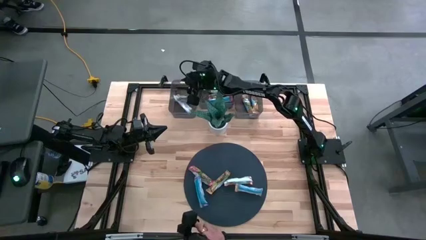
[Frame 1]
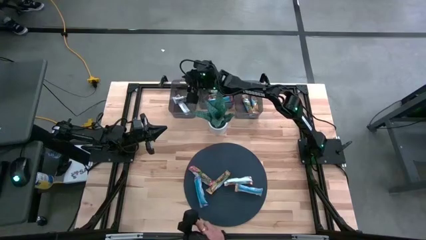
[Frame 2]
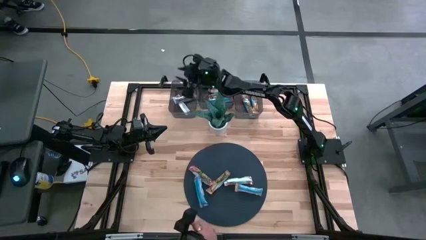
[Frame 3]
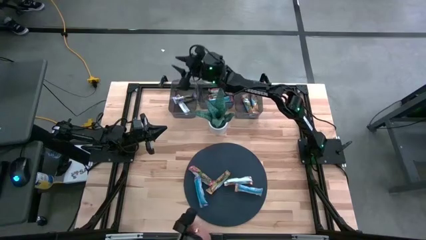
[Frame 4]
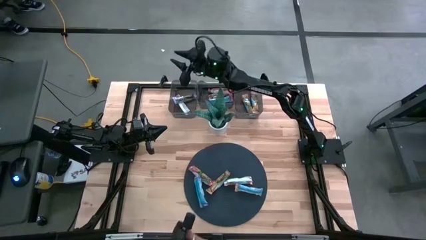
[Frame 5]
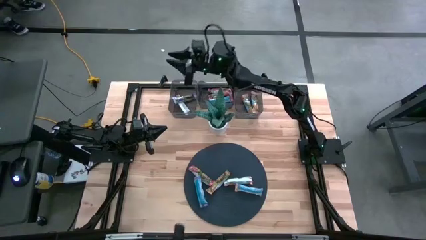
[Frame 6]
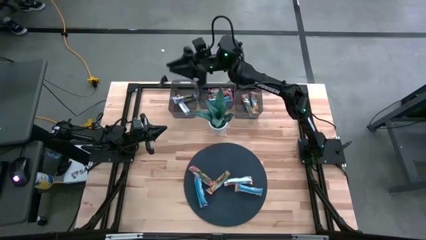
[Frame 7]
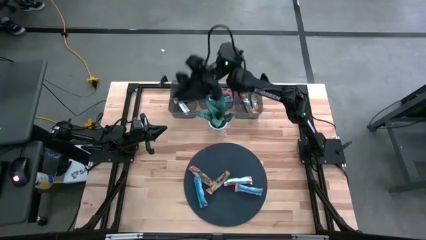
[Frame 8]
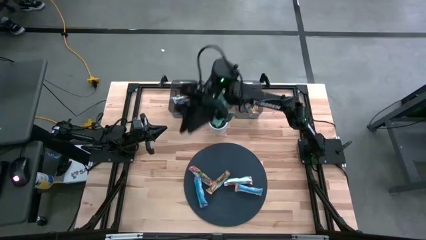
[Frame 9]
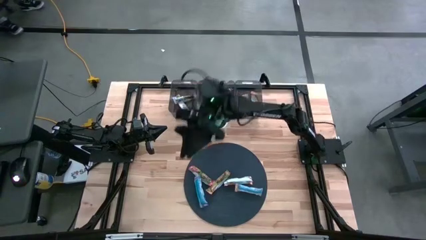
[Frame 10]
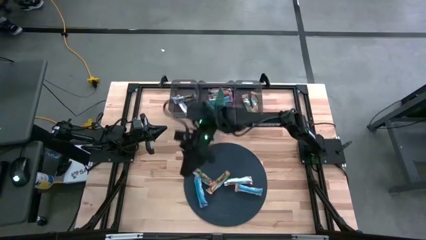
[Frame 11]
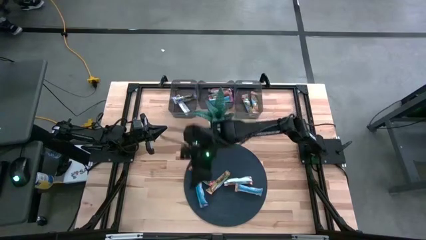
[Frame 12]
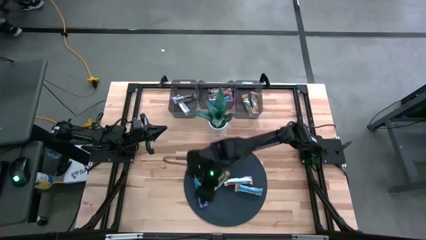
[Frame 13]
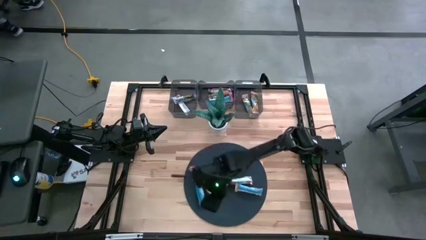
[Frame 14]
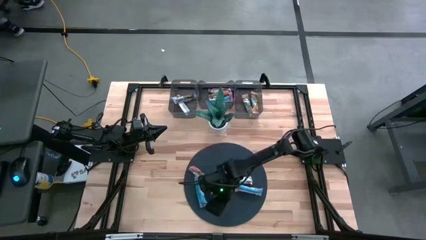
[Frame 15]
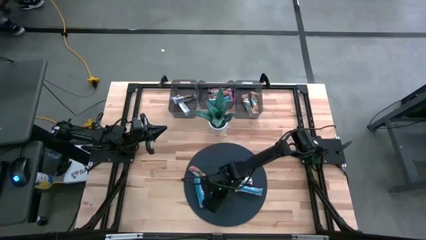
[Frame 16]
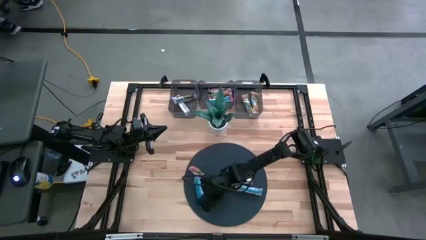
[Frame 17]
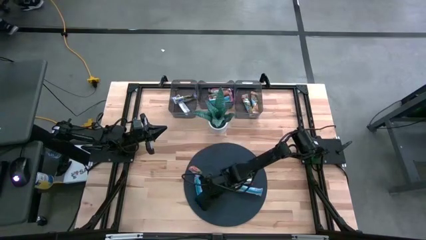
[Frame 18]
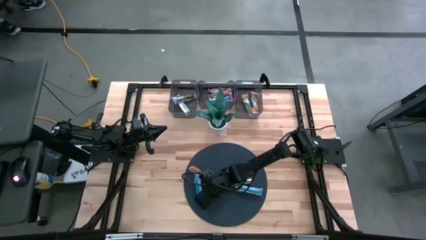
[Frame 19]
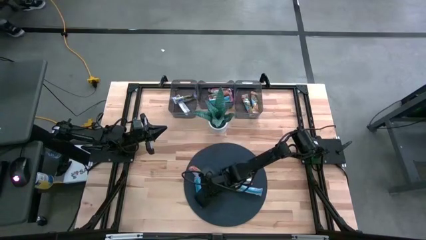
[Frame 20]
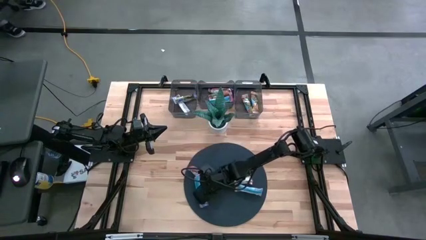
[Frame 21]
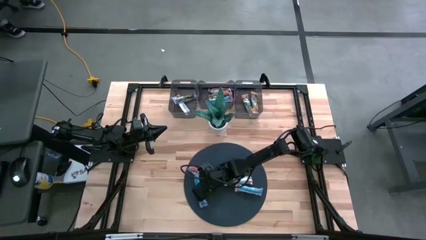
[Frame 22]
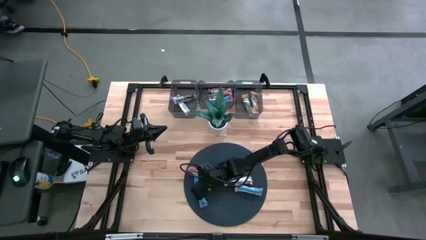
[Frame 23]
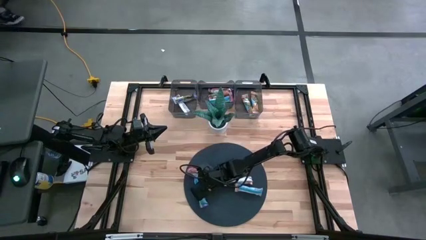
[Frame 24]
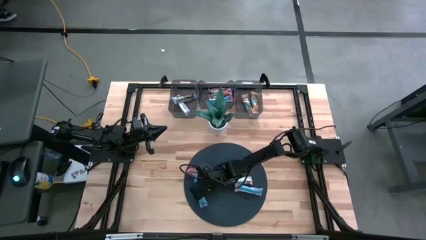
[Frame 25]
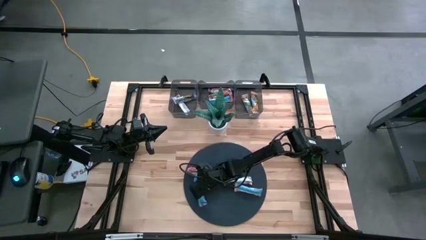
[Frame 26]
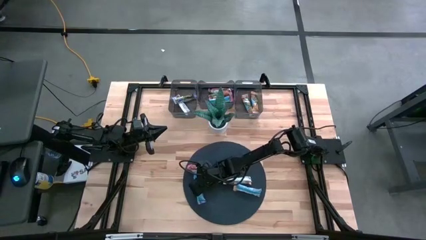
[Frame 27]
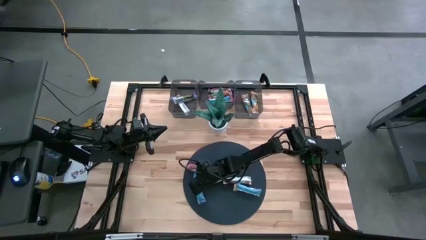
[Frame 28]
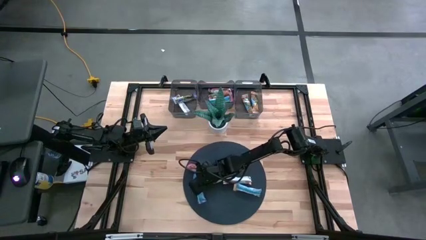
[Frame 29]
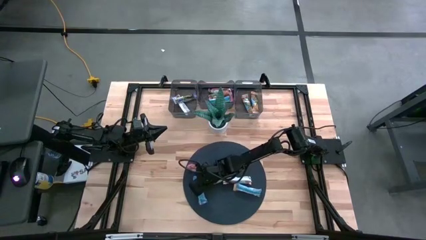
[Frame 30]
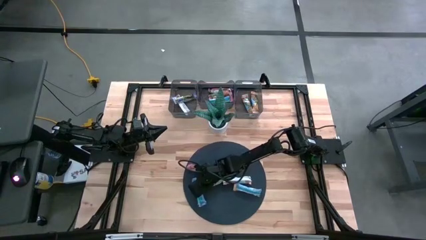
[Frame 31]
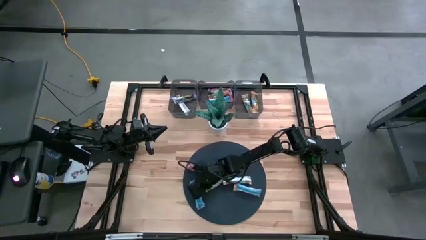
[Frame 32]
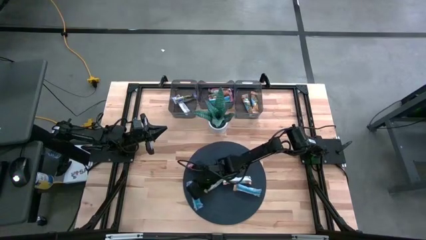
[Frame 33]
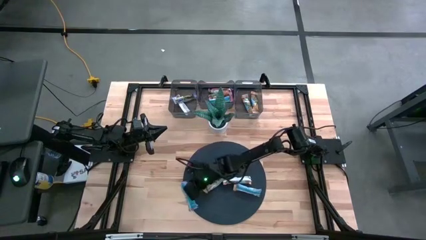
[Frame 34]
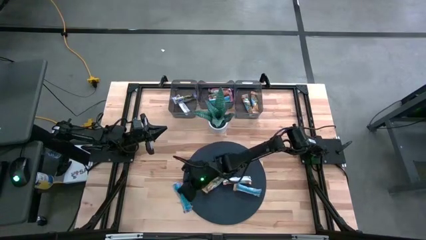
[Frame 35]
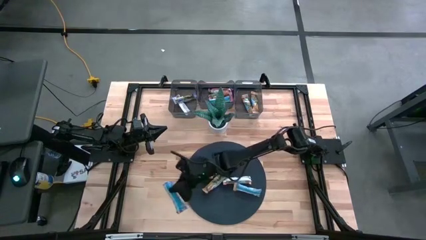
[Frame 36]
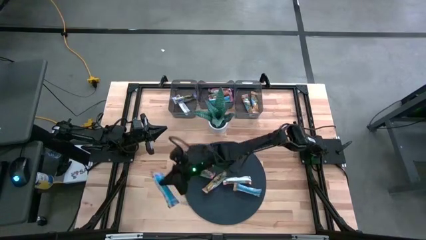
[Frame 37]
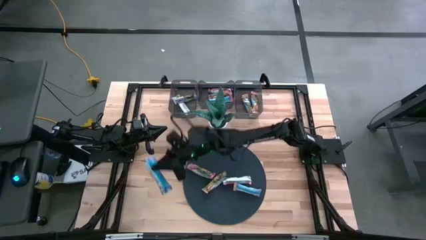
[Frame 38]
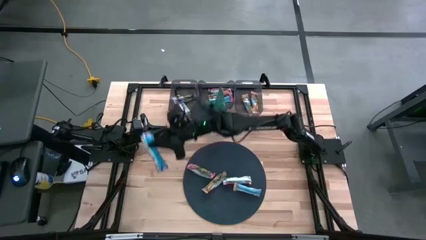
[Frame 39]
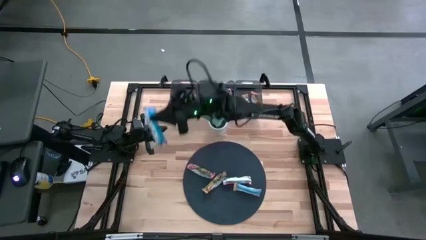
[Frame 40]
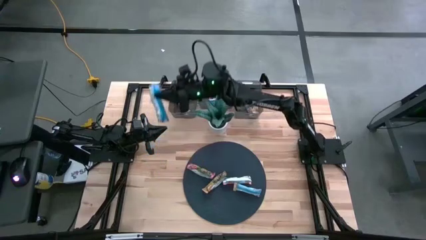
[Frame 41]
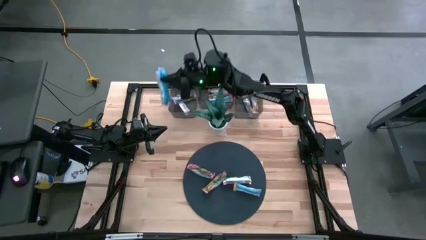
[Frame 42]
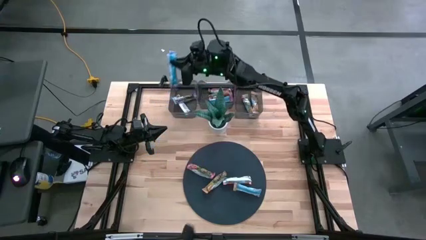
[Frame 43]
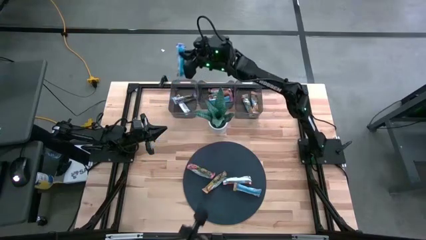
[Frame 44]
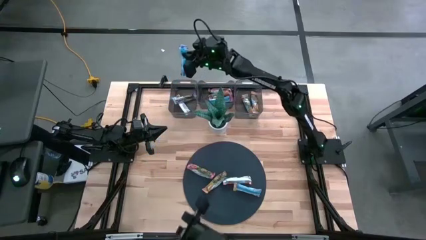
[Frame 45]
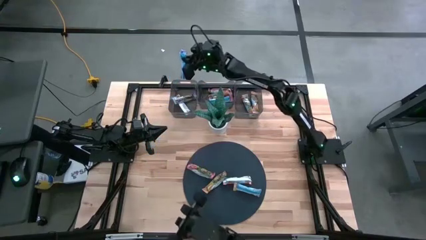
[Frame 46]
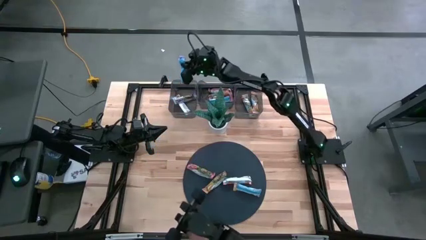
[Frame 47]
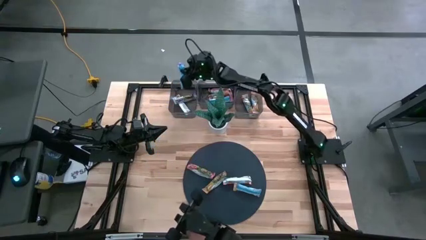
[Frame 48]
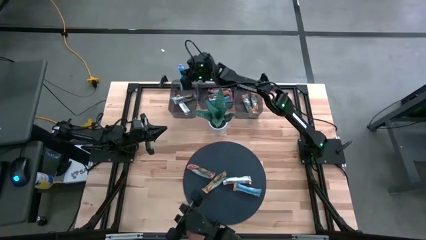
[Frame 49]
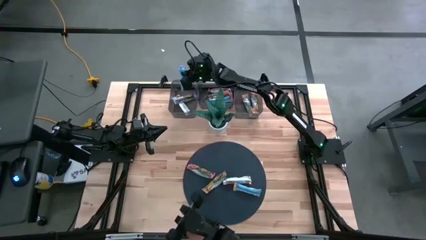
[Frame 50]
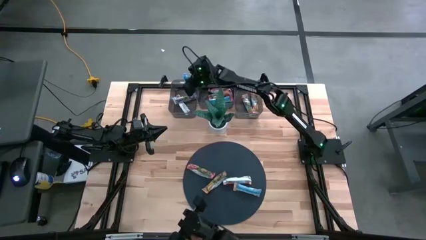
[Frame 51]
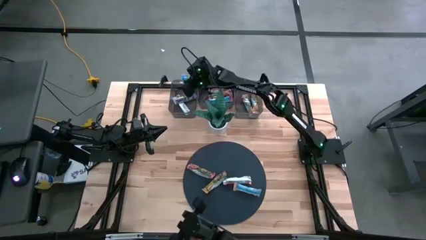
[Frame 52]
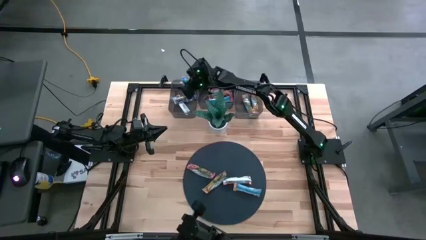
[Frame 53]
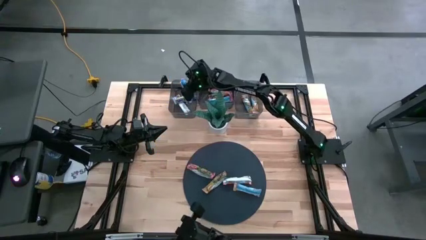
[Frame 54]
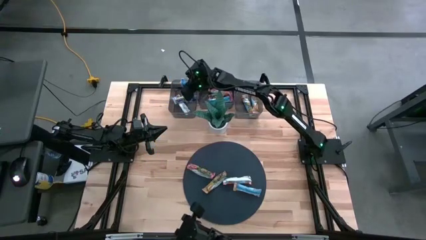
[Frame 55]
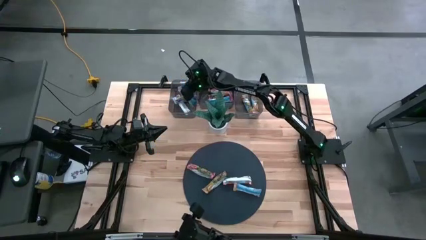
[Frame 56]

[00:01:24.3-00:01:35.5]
Task: Pick and place Granola Bars by type
Put the blue granola bar into the left black bin

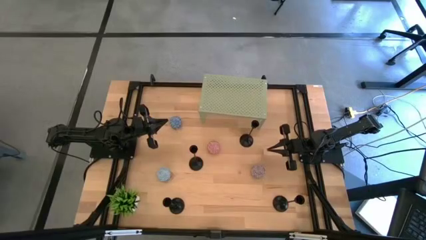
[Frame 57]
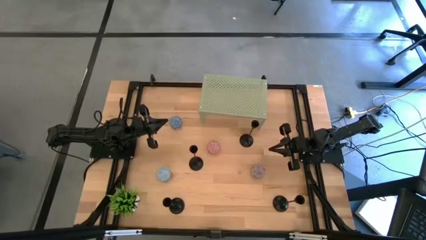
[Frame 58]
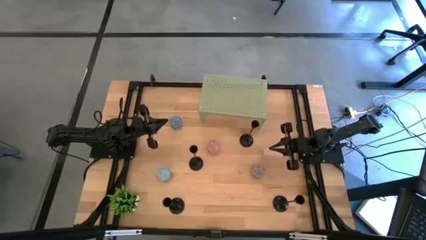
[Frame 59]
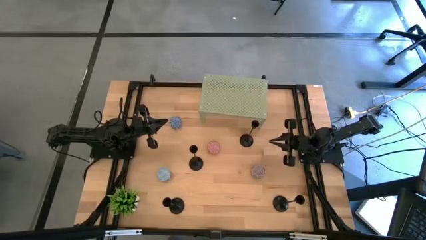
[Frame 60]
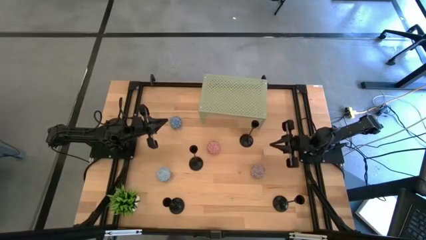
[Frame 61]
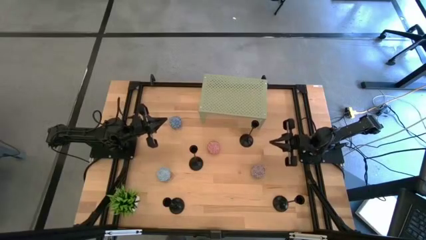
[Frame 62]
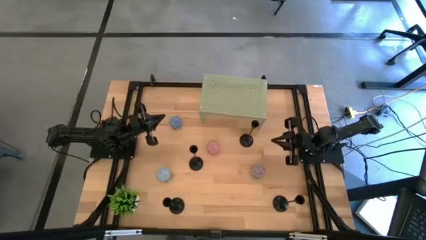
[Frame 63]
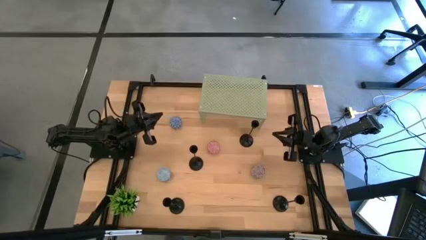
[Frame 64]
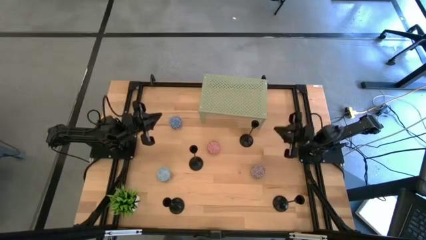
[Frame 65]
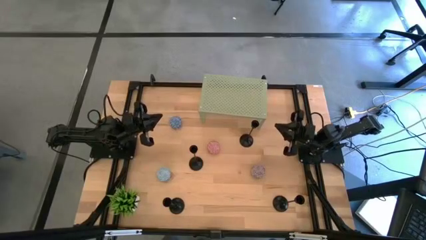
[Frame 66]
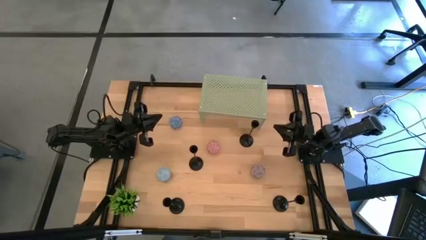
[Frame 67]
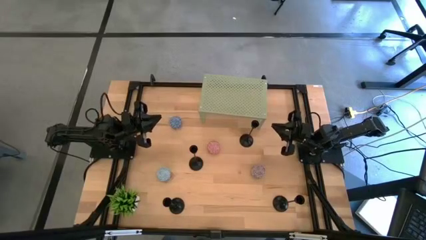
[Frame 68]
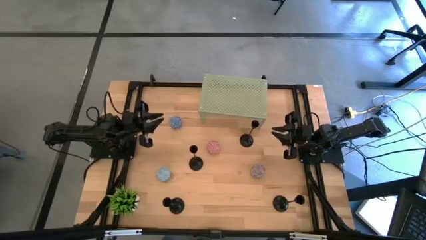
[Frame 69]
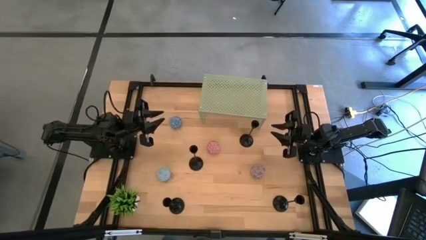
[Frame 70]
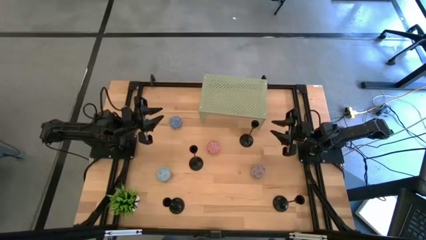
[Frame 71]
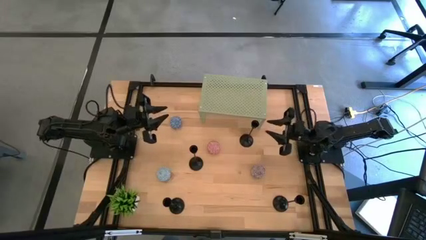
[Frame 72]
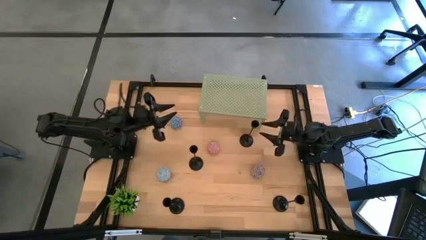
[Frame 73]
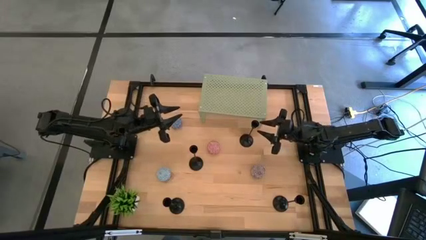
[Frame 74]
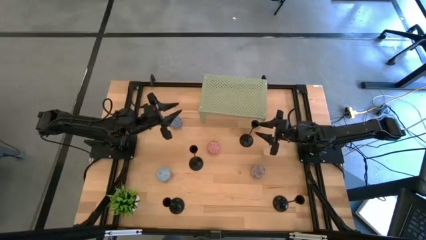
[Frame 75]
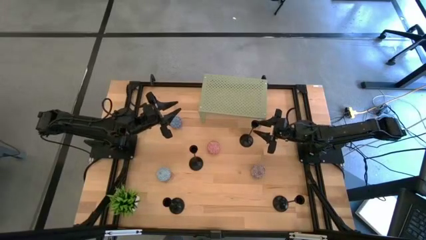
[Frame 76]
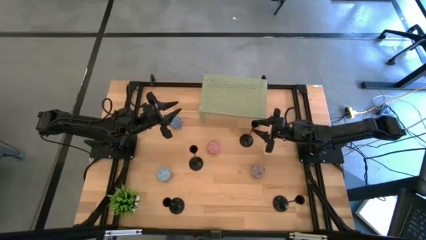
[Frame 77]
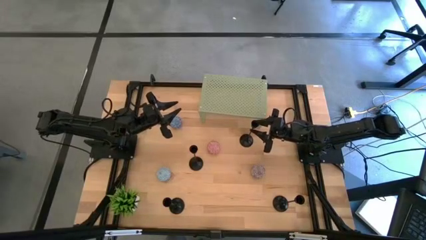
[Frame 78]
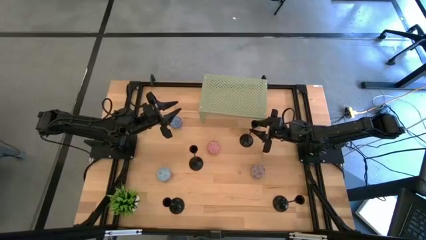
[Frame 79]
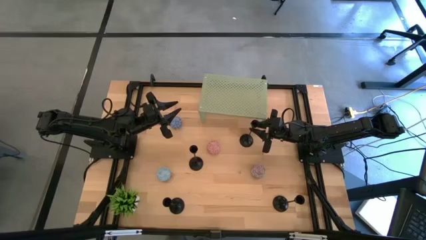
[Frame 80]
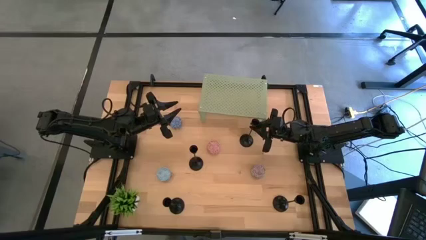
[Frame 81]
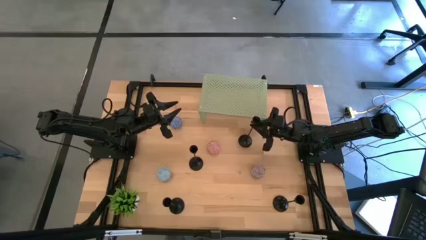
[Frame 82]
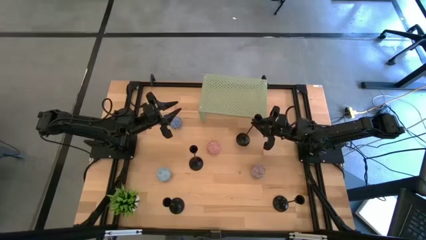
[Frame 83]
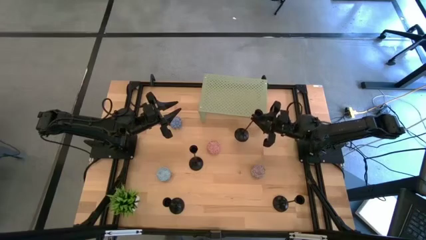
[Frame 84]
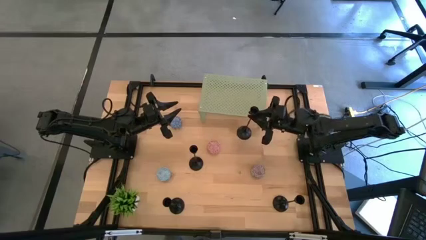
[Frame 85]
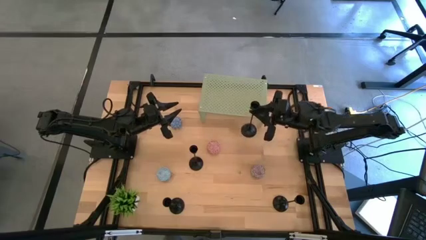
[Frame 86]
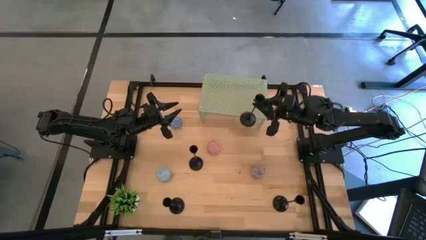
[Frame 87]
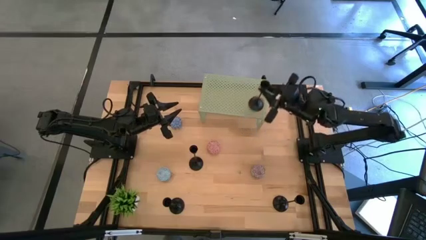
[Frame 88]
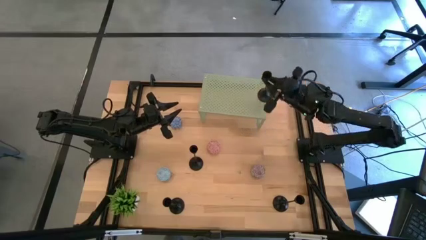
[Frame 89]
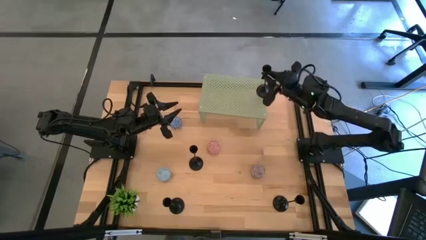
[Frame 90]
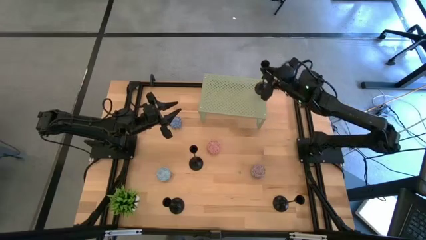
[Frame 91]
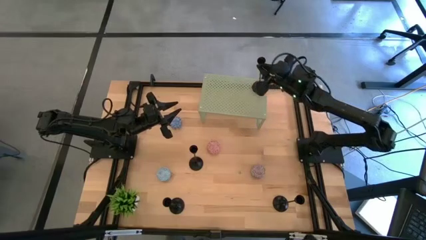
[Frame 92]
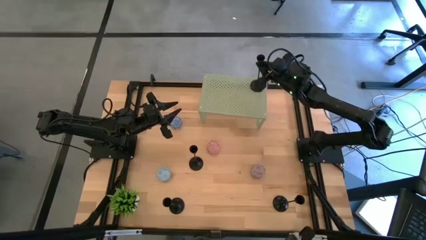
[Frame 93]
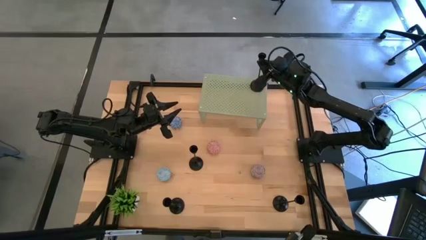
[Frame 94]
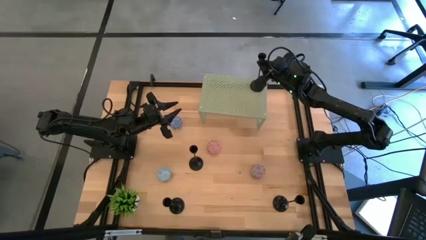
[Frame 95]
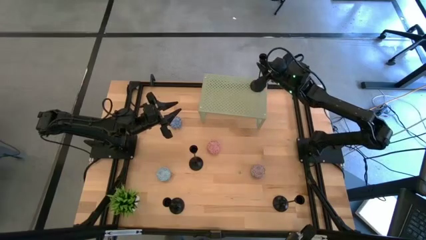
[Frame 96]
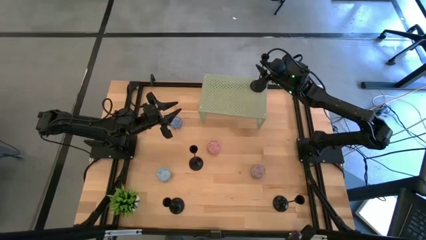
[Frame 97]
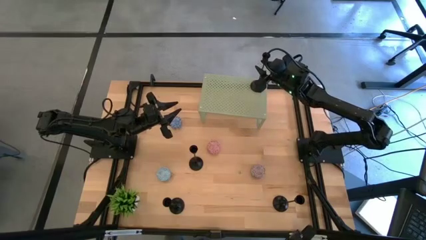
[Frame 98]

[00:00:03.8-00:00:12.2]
Task: Pick & Place candle stick holders
Put the top black candle holder on the shelf
